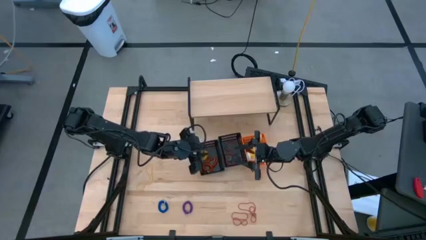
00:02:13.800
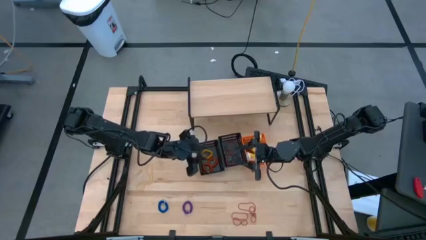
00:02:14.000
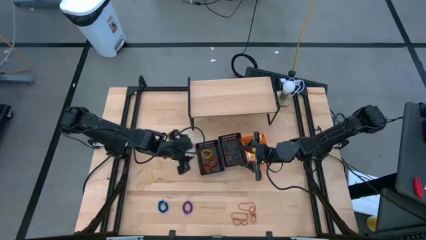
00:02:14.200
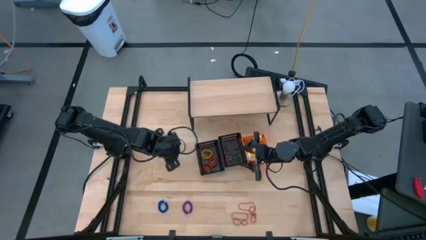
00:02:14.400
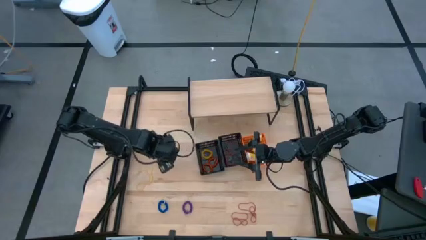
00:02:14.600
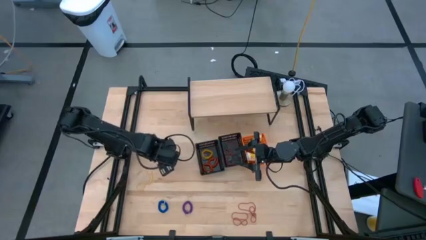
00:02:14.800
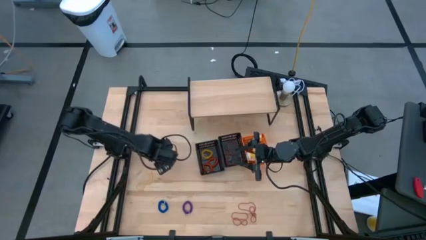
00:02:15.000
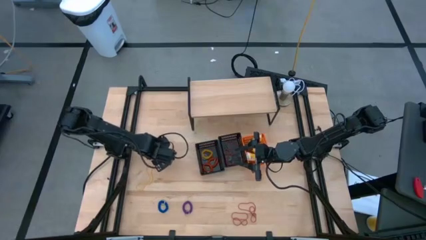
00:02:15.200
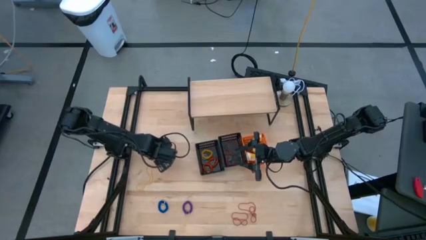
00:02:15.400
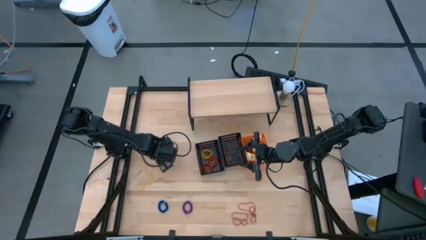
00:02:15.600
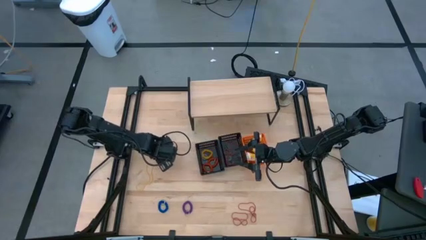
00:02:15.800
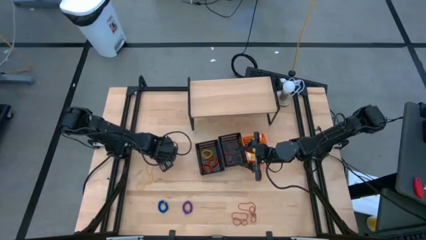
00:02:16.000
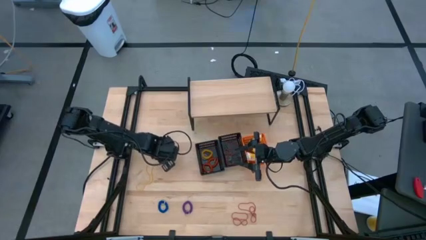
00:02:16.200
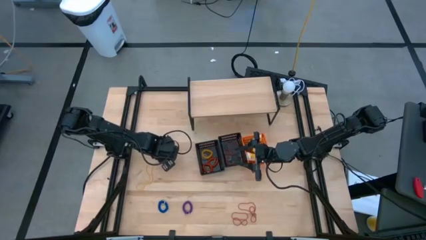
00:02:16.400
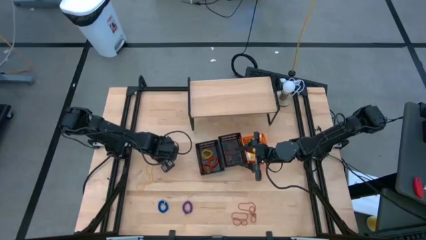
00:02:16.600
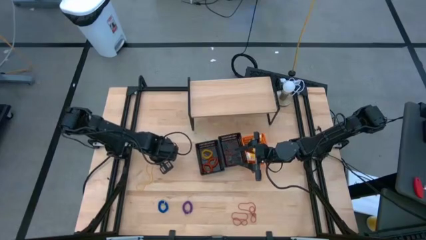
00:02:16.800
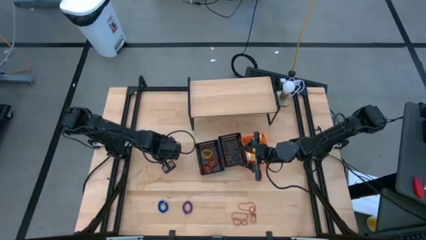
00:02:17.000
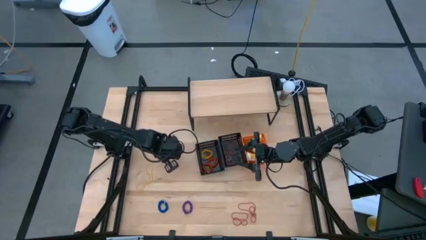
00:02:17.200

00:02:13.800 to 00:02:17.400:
Task: Pick & Place Office Desk Supplies
Put the top yellow rubber band into the right black bin

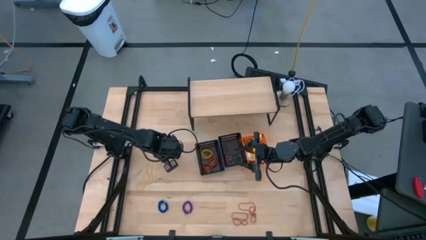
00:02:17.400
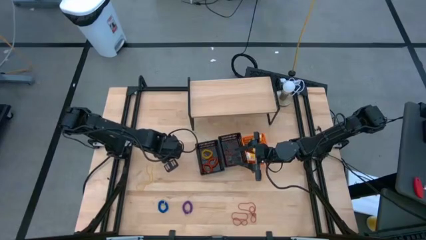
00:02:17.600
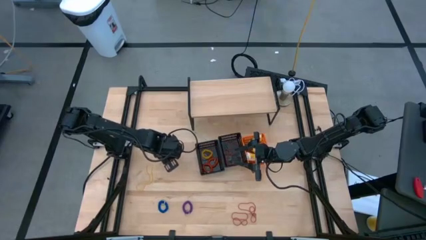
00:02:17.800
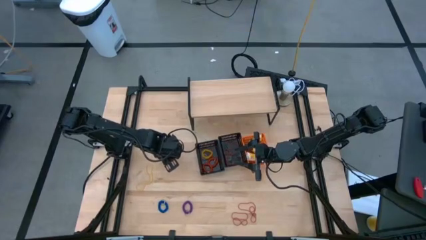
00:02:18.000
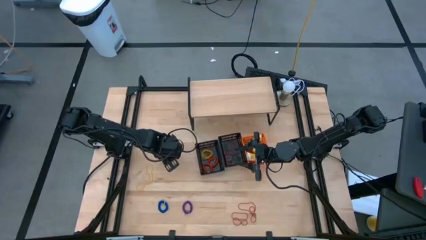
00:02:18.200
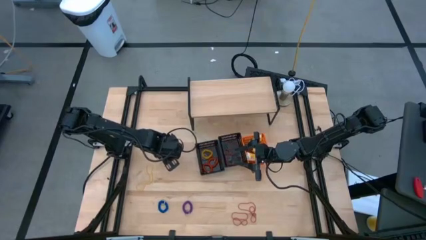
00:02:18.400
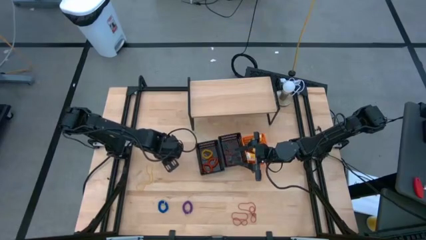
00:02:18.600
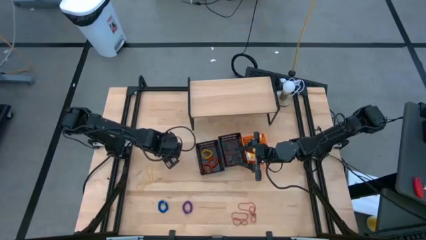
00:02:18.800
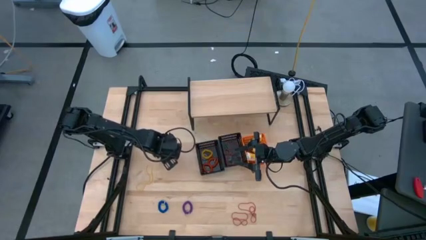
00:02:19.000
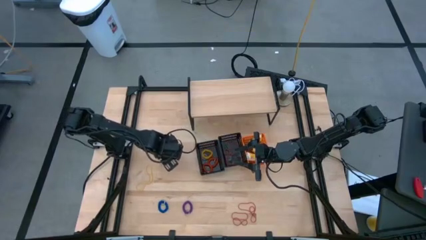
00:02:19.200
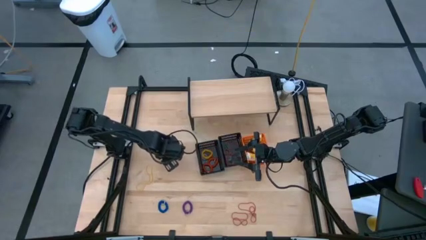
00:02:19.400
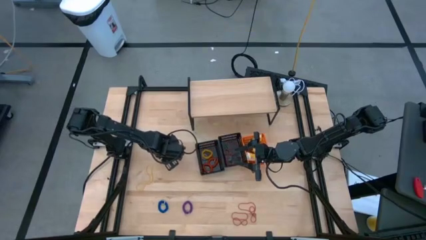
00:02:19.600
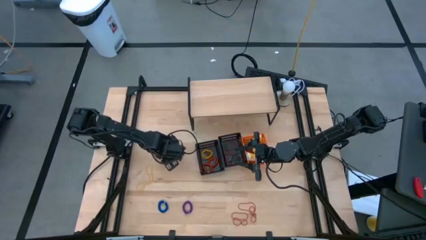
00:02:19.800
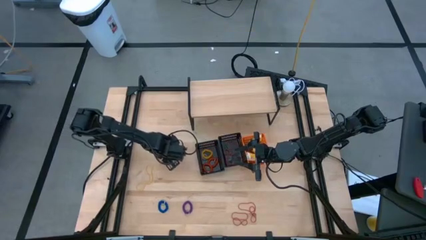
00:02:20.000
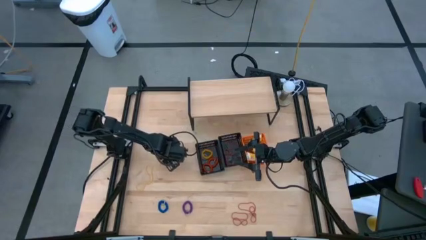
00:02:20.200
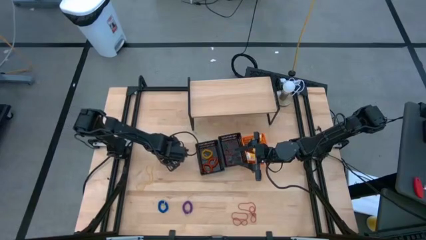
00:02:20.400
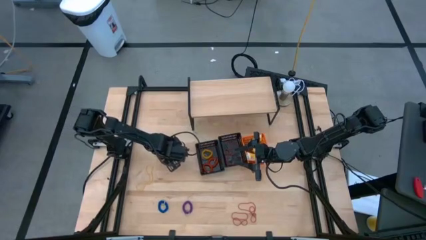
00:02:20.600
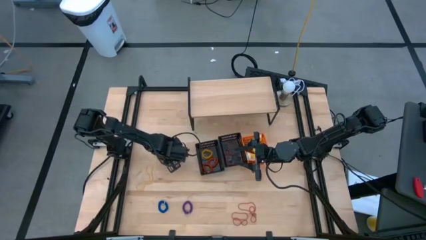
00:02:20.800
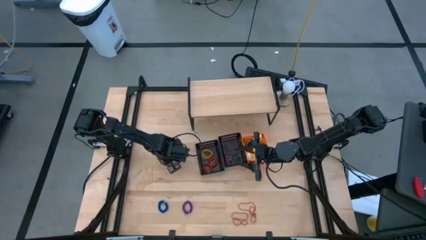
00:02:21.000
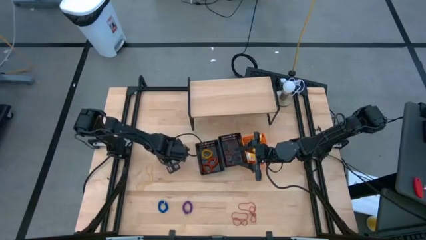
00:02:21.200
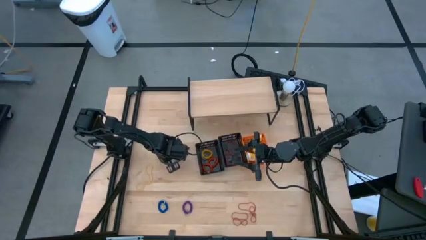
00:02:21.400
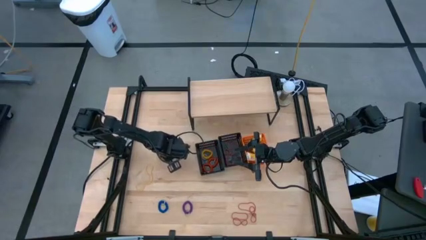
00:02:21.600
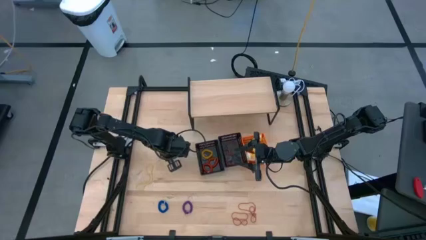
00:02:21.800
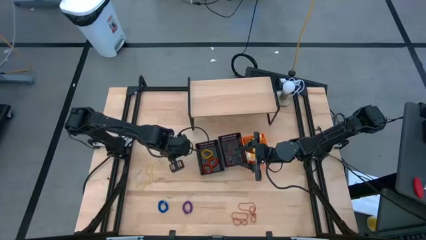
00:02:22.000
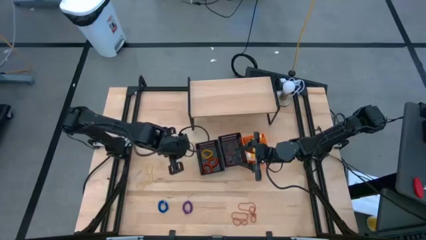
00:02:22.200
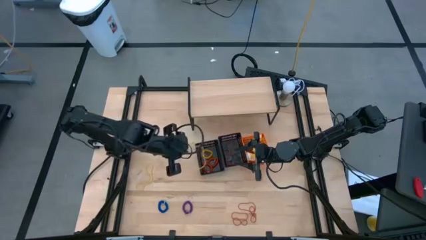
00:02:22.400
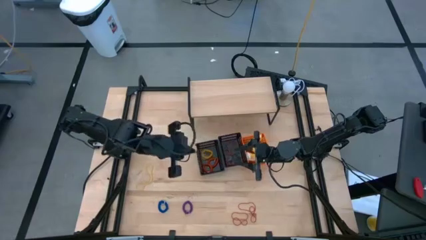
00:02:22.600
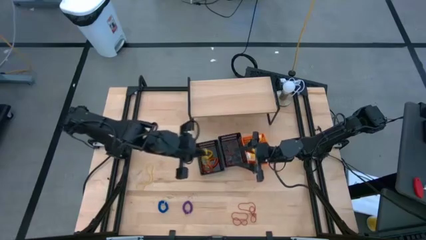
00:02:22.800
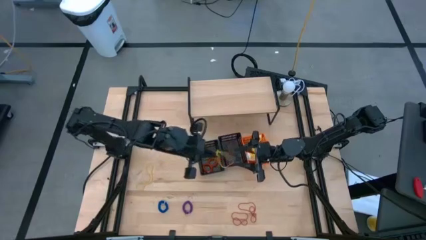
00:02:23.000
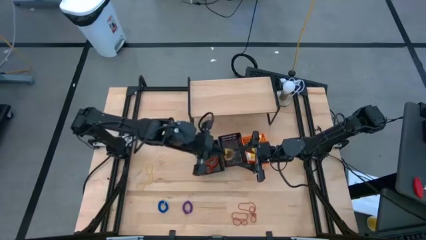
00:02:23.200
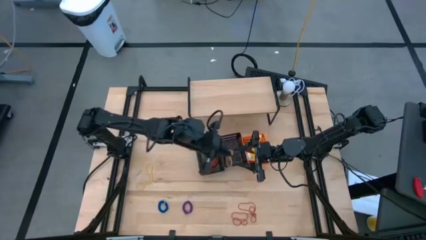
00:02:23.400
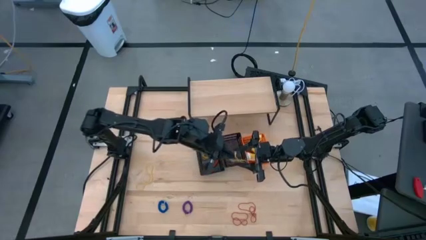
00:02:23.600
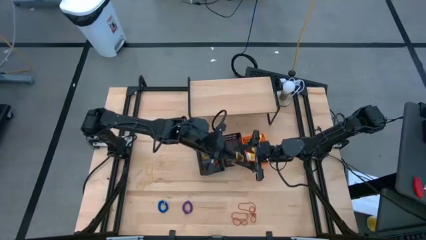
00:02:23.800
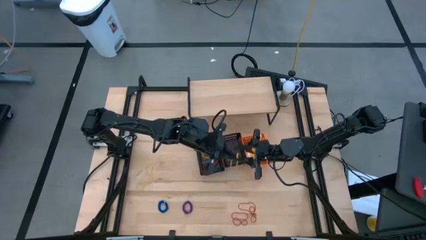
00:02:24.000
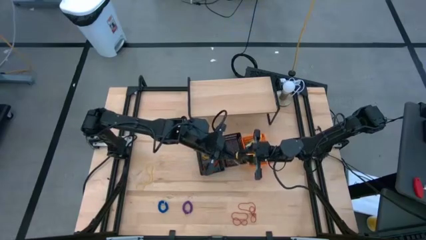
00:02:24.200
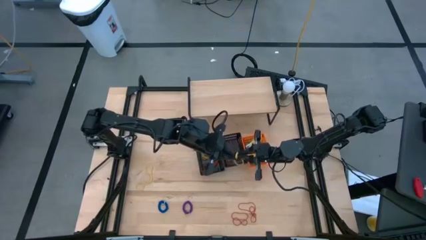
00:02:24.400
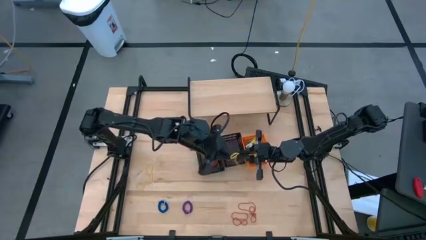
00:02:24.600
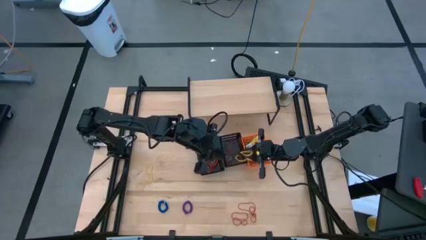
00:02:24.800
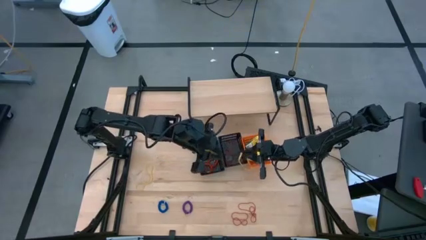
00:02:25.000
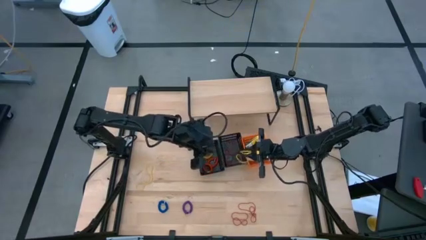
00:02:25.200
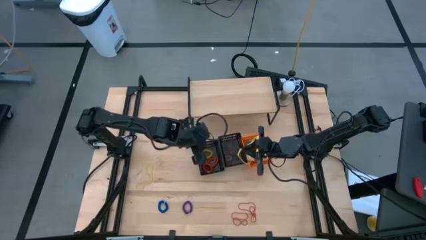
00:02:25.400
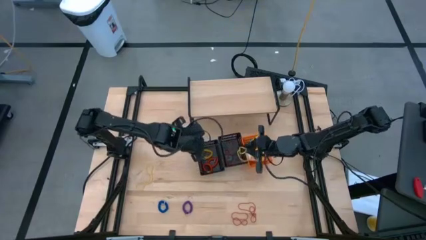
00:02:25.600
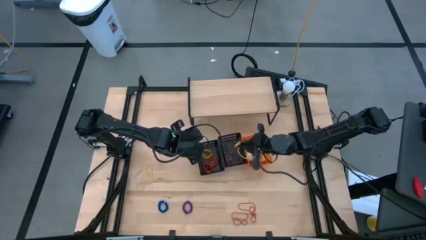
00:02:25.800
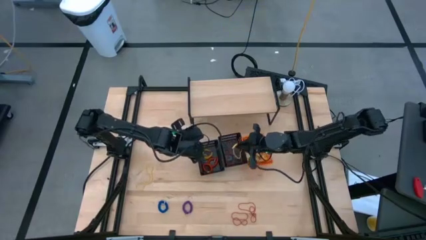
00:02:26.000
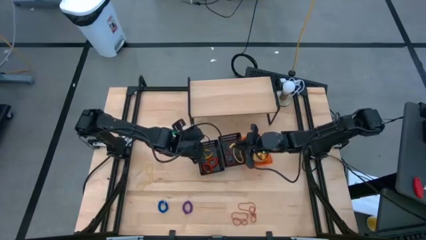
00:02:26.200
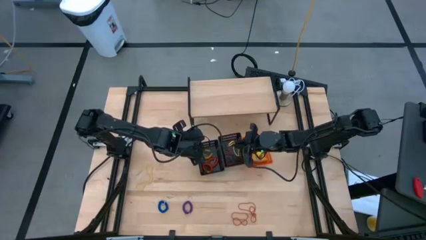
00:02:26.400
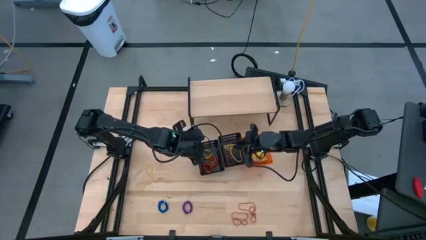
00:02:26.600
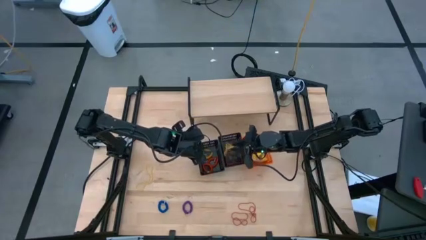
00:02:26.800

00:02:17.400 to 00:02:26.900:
Put the top yellow rubber band into the right black bin

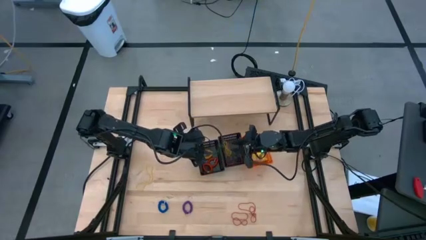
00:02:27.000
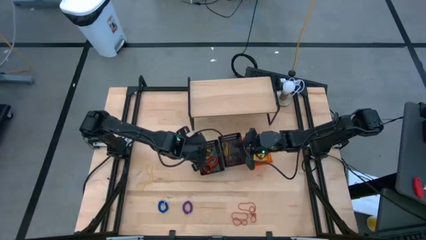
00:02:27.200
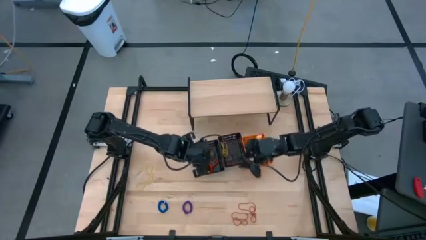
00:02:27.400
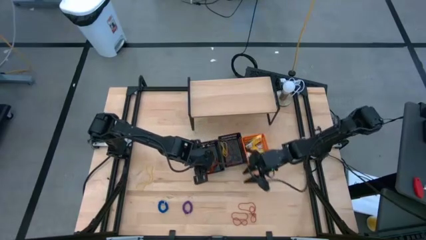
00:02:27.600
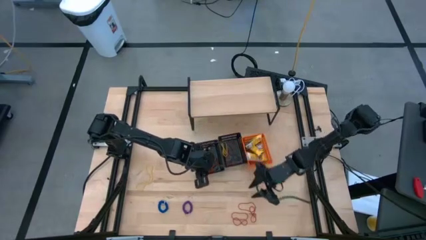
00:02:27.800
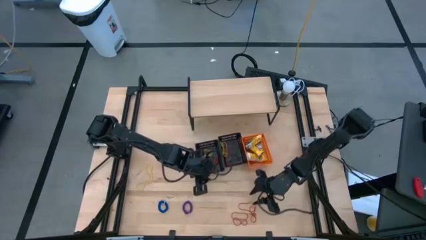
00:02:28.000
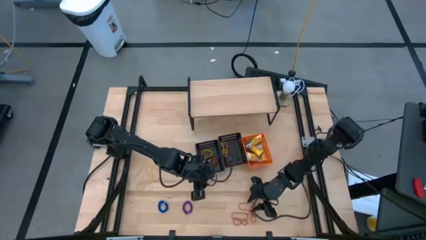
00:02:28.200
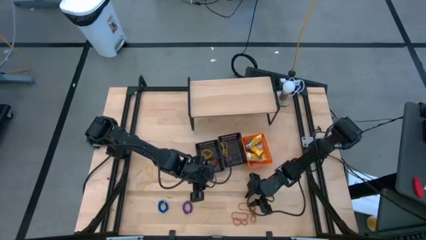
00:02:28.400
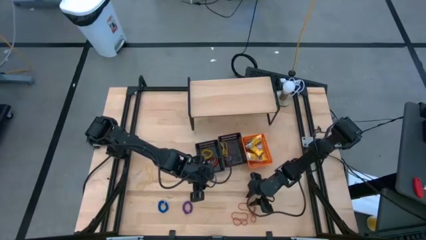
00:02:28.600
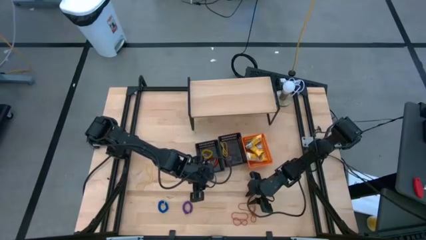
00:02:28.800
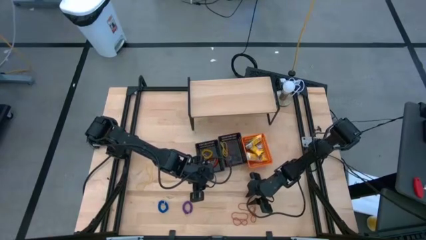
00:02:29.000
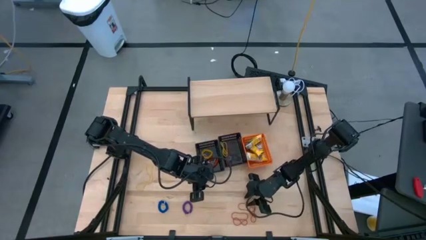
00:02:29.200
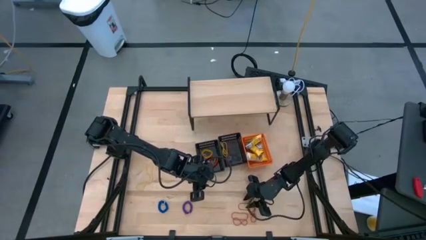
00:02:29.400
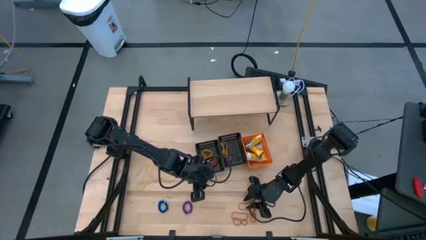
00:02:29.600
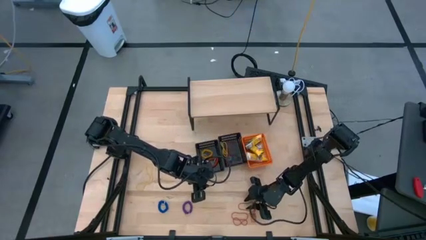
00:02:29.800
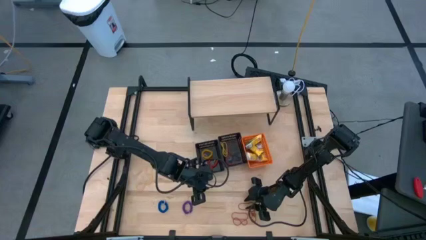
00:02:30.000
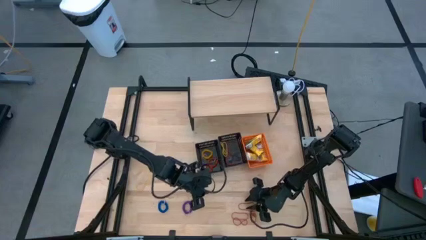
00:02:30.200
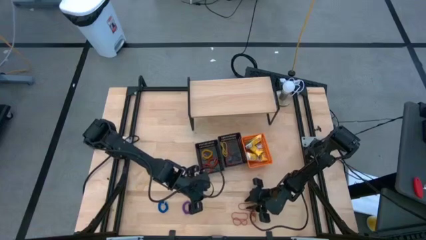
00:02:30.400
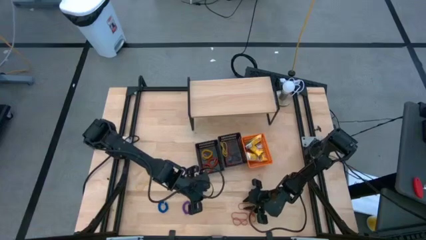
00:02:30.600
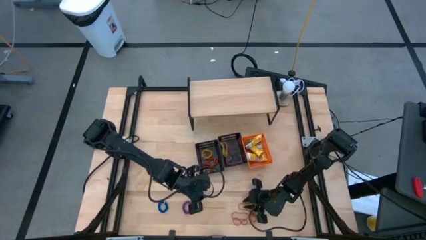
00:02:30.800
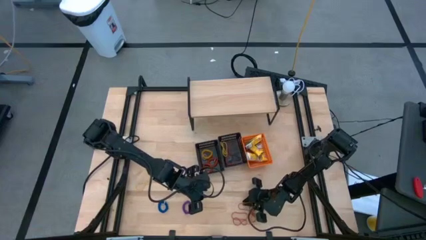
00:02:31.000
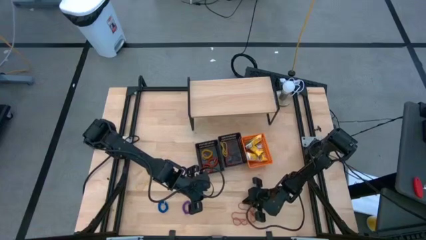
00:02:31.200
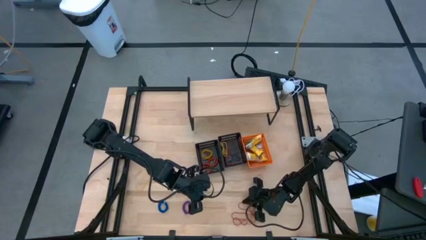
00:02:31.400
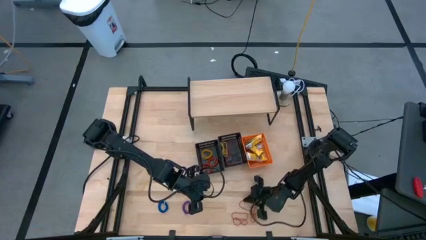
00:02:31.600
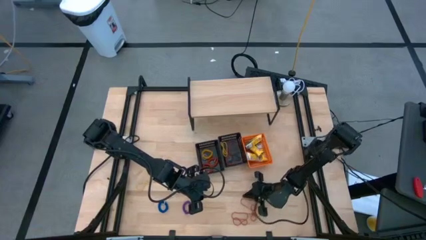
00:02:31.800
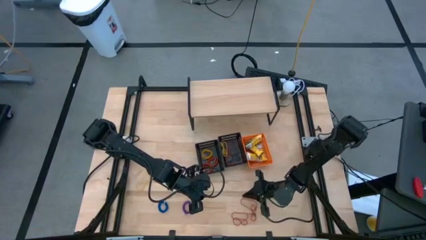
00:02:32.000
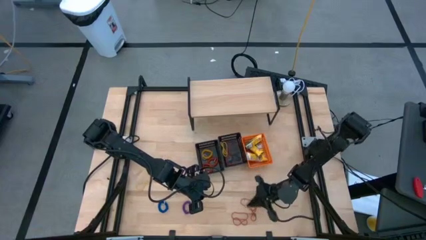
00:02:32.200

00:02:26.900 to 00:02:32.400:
Put the orange rubber band into the right black bin
